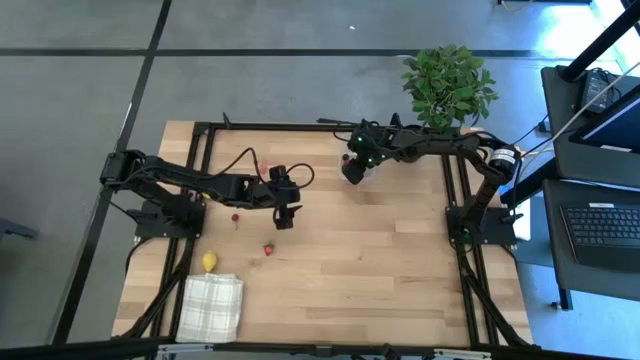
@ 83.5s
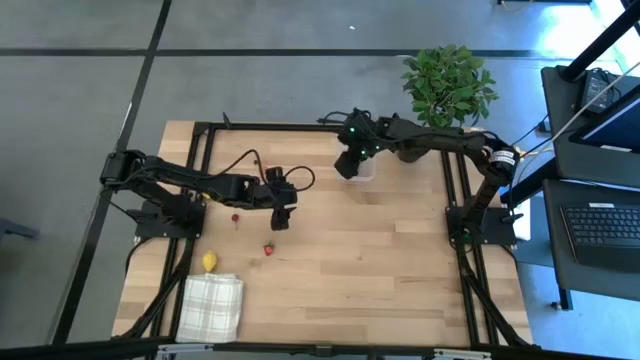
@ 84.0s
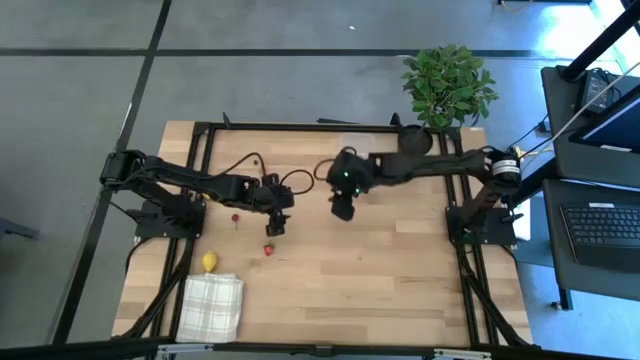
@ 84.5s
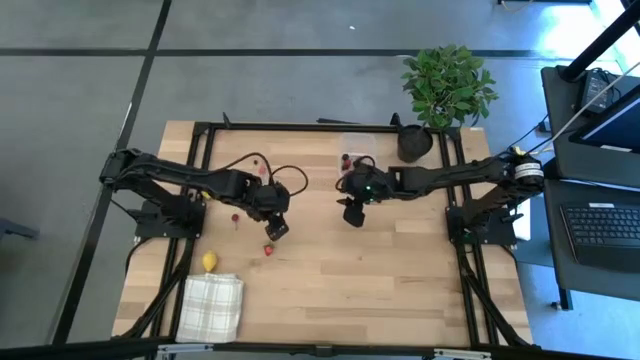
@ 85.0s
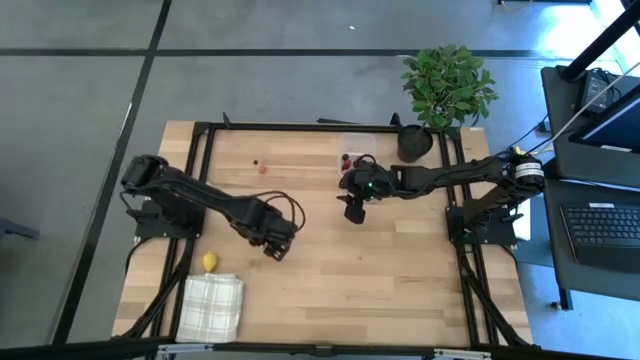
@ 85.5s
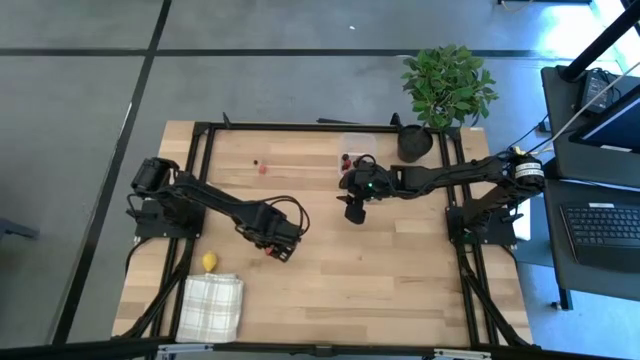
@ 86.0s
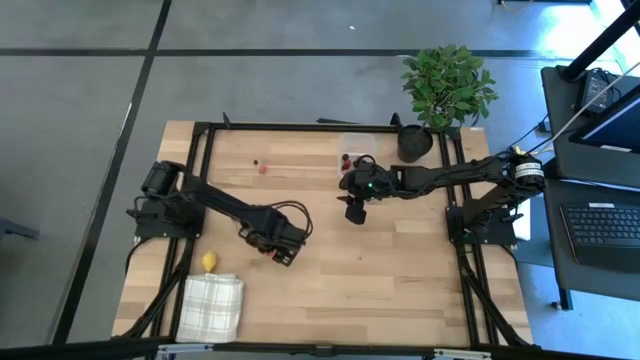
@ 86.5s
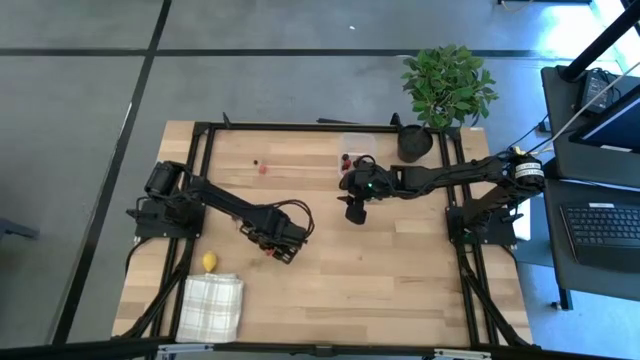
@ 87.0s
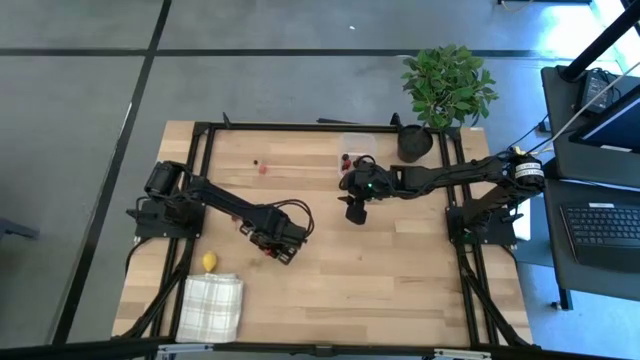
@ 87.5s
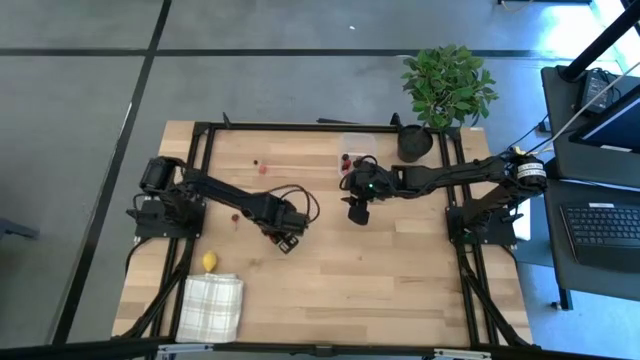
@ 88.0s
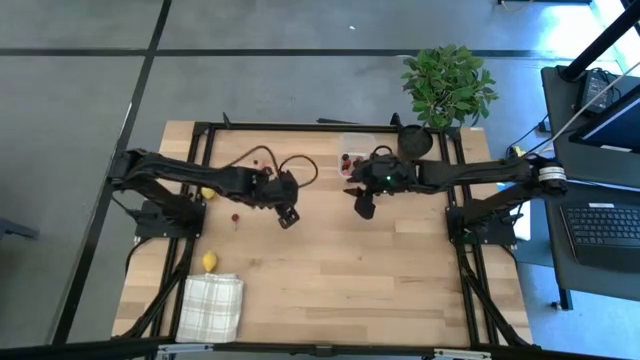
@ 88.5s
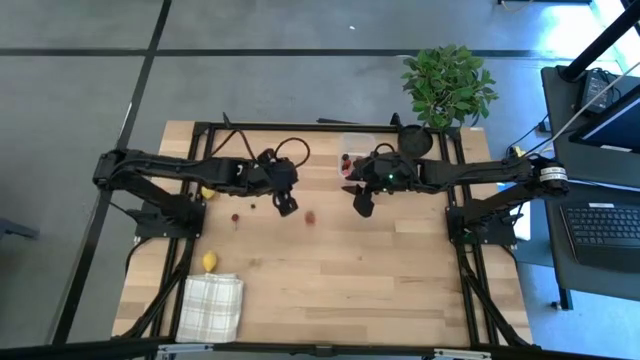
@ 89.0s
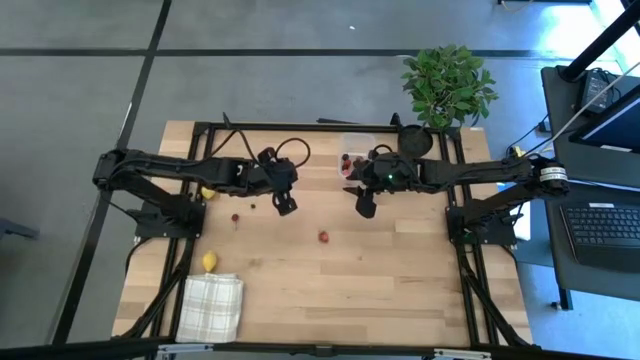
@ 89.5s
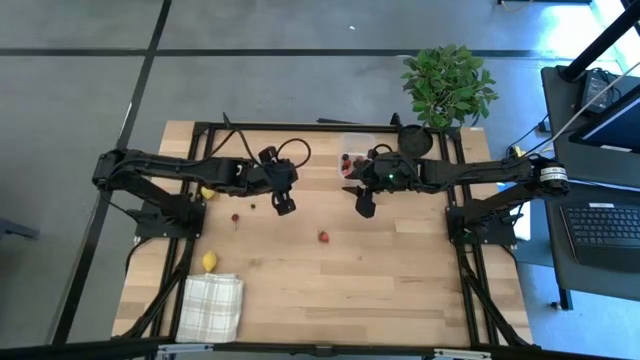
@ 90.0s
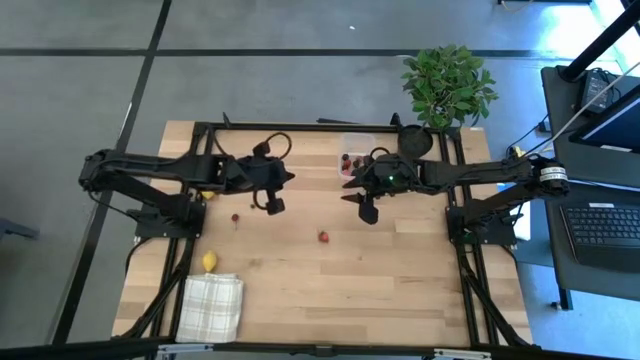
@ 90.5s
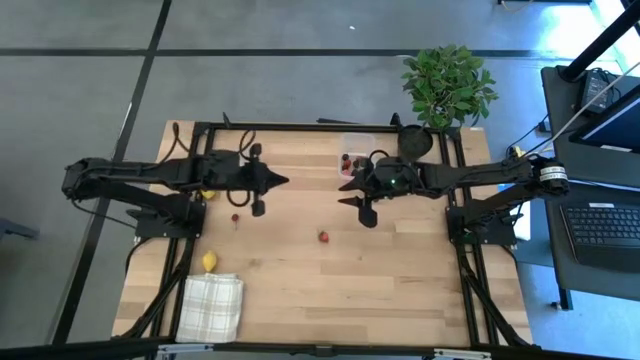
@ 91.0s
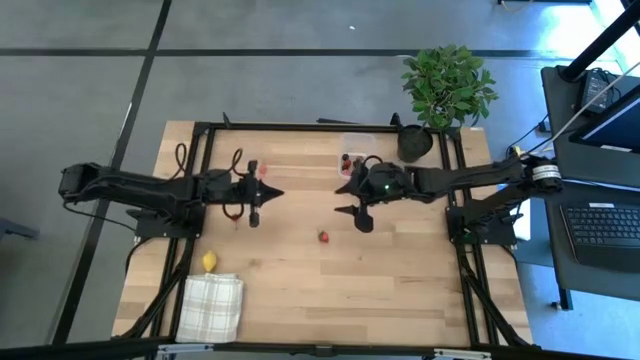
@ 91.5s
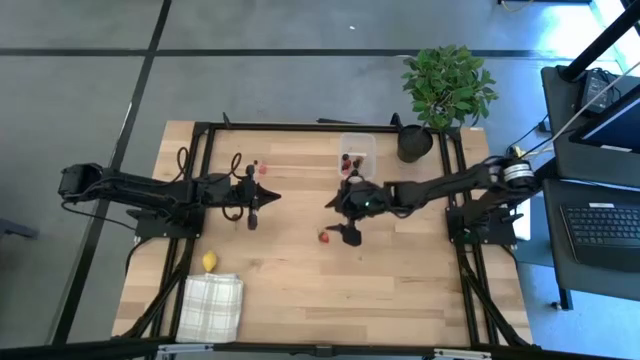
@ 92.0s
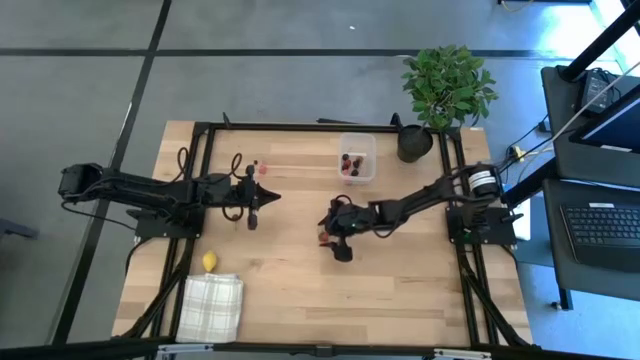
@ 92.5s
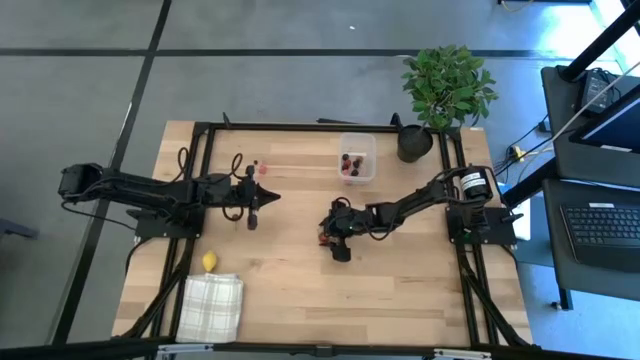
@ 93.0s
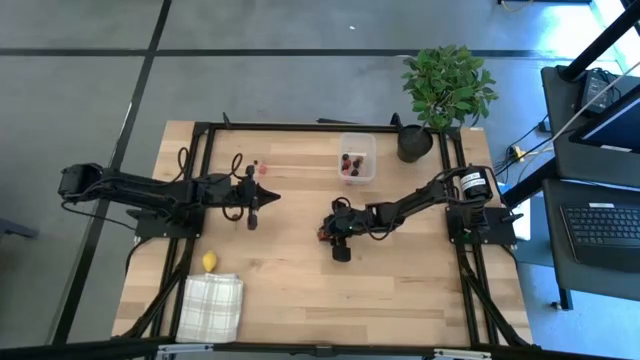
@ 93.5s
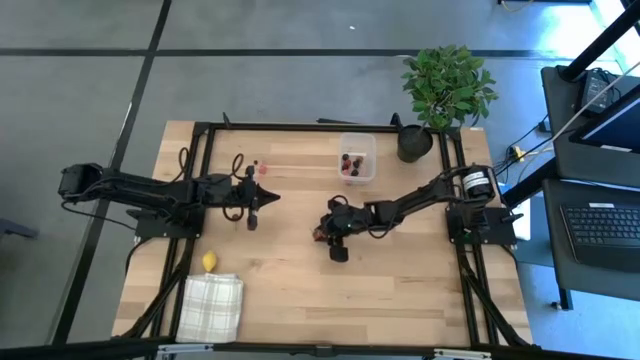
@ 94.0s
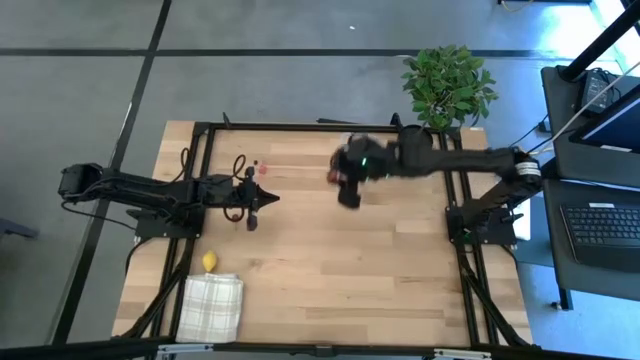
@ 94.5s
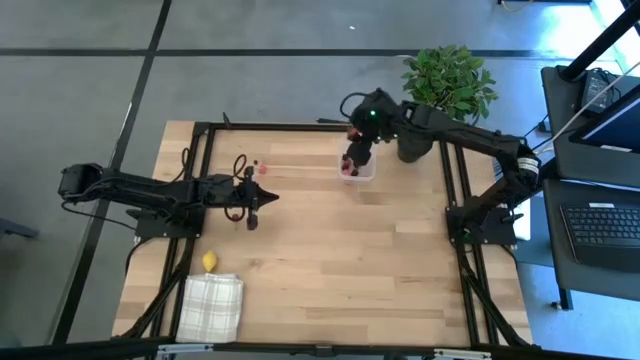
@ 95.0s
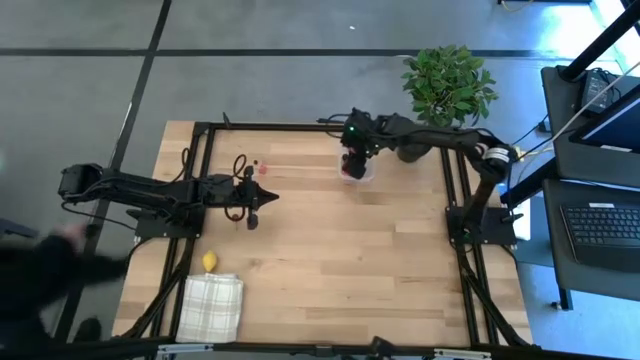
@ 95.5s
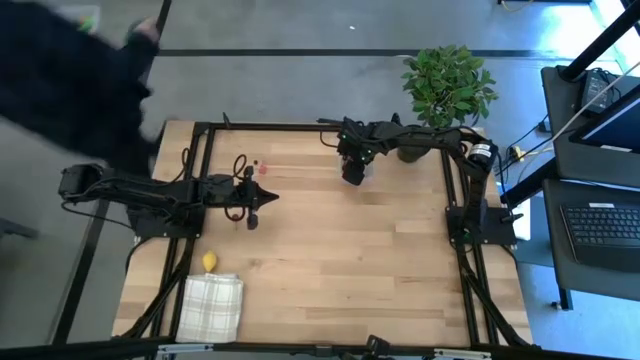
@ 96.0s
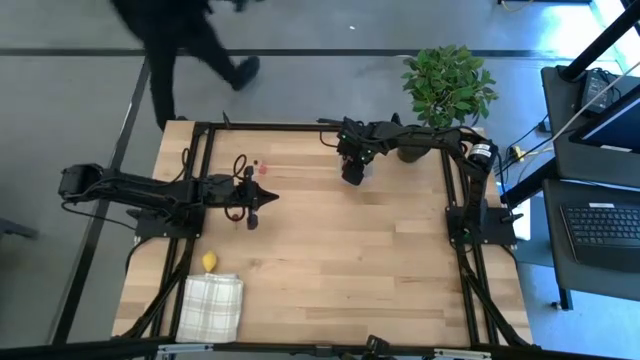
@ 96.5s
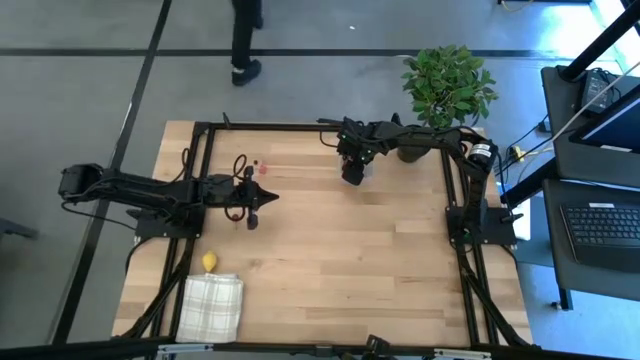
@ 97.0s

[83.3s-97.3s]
Task: Pick and placing Produce into tupperware
Put the strawberry into the transparent bin

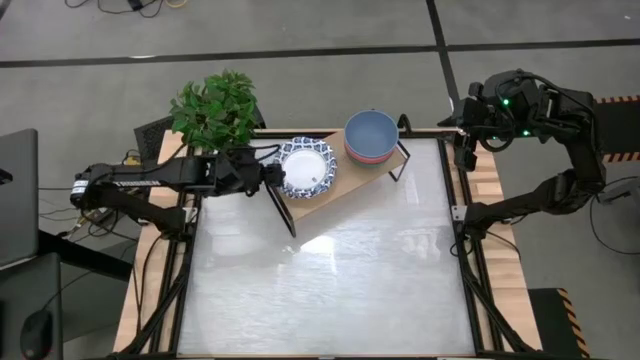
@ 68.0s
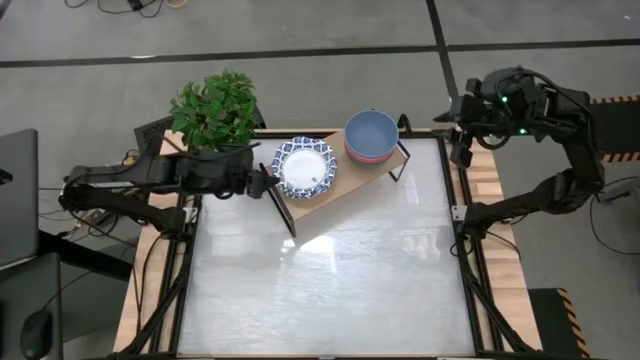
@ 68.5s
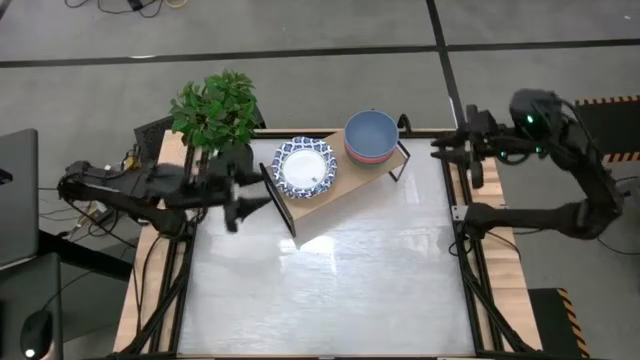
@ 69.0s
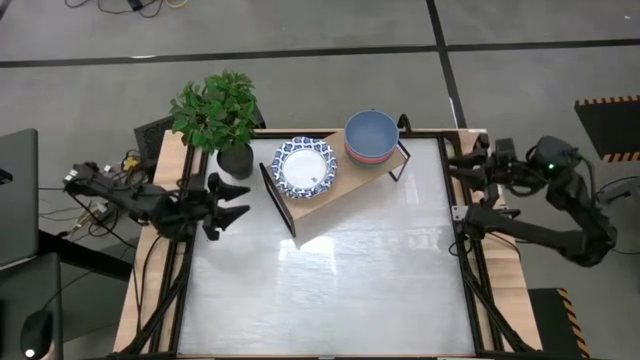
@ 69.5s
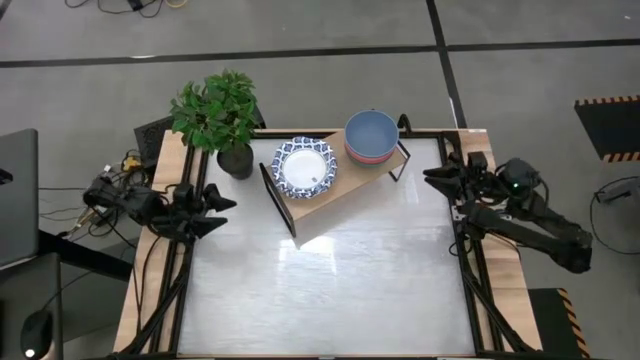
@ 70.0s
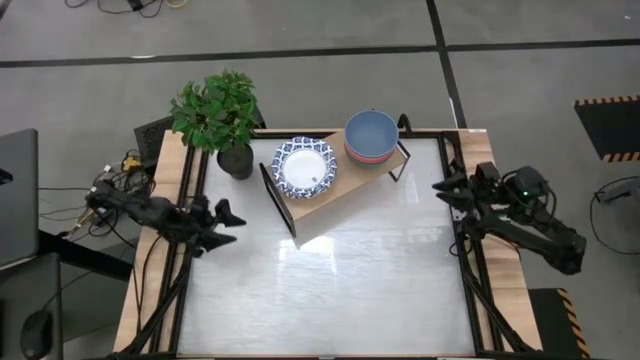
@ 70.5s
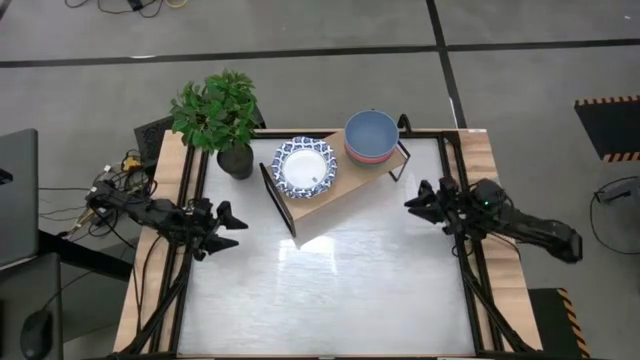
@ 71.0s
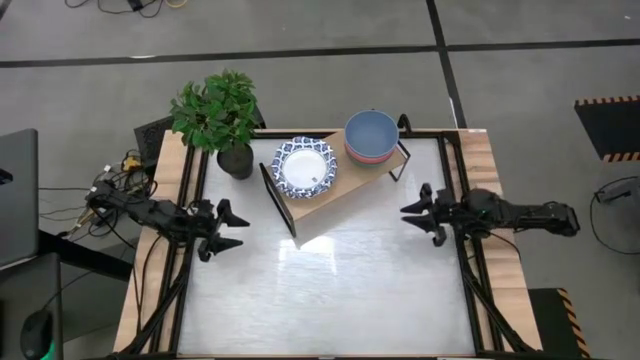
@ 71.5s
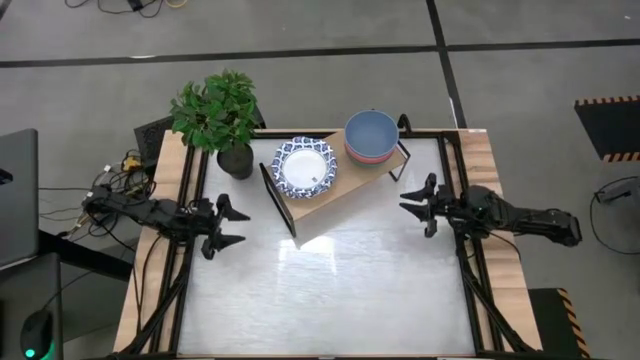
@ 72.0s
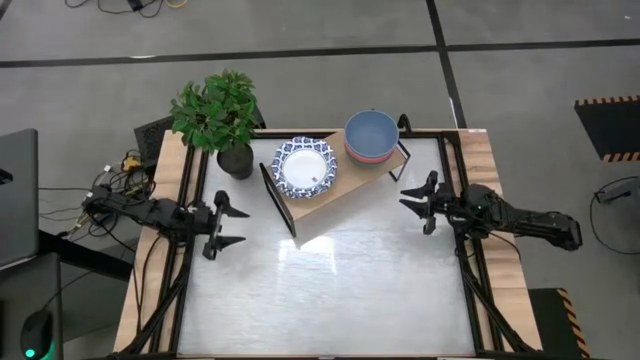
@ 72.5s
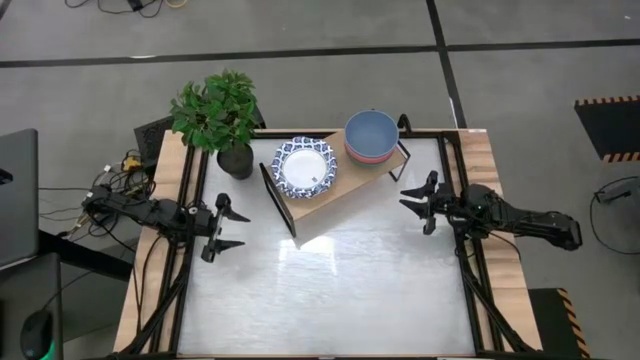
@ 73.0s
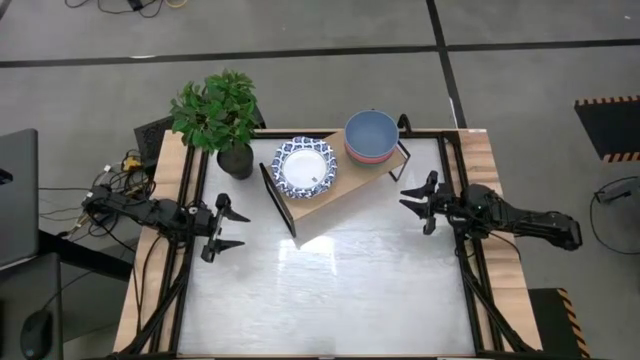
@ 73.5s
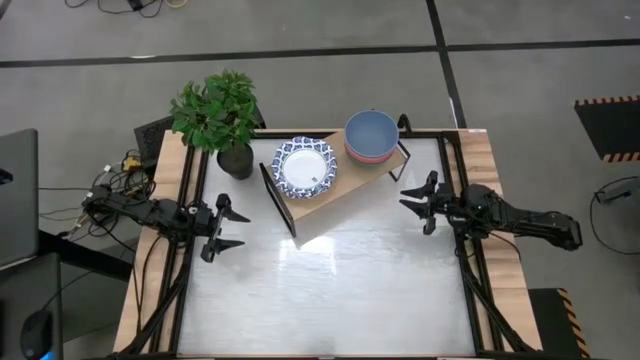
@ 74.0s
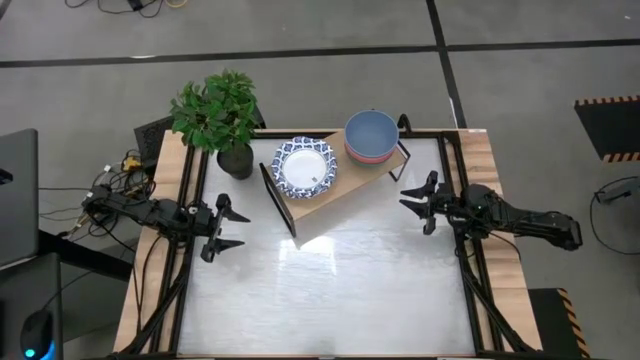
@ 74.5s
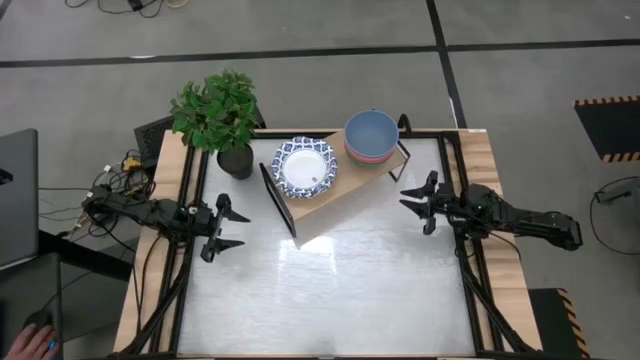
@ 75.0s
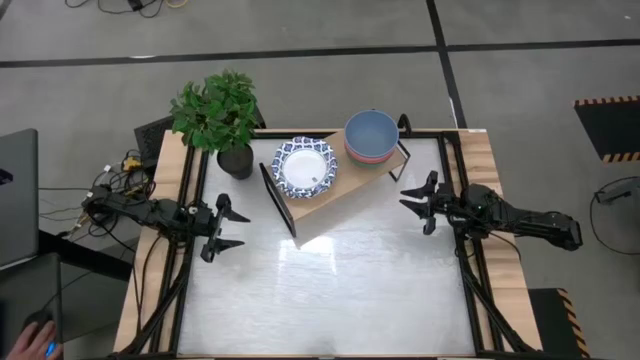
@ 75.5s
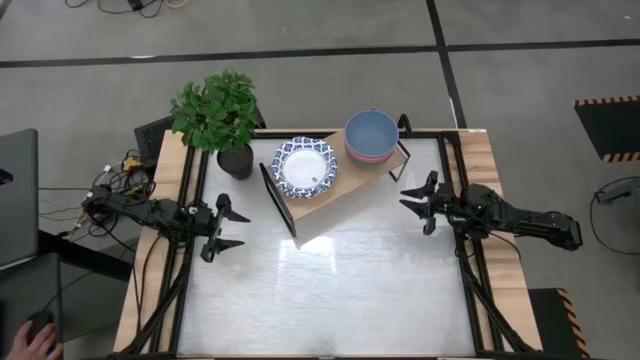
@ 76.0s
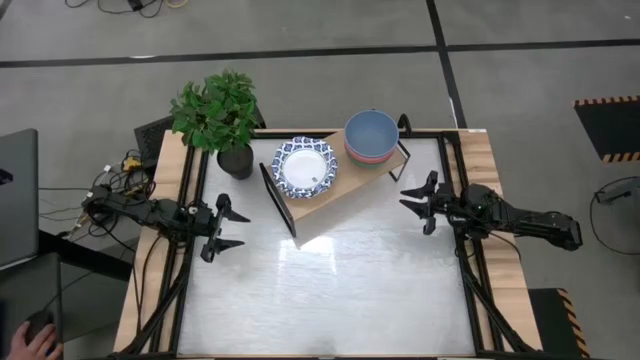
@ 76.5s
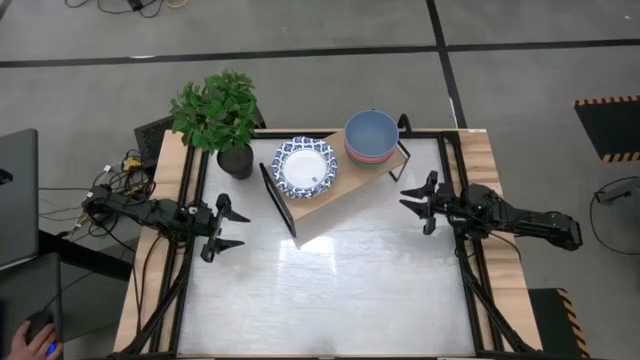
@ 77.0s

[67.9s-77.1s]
Task: Place and stack bowls onto a shelf
Return to Home Position
